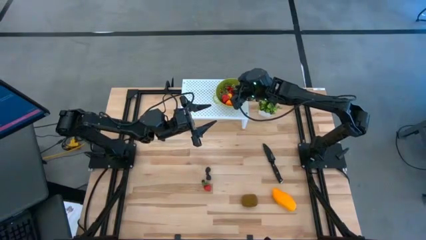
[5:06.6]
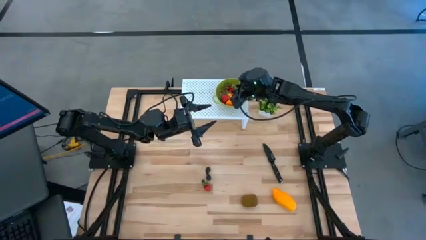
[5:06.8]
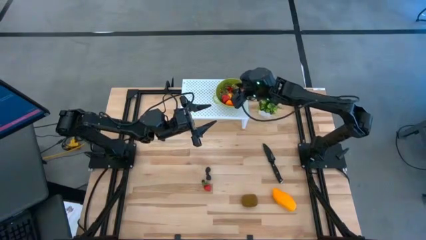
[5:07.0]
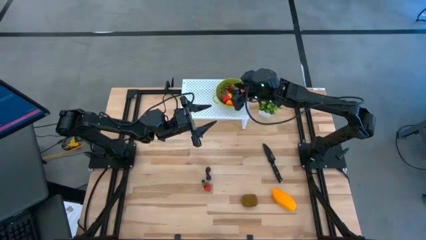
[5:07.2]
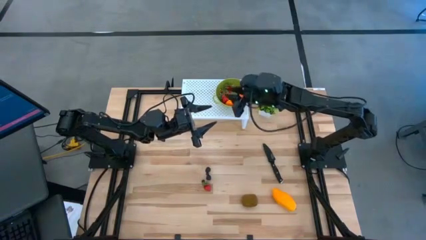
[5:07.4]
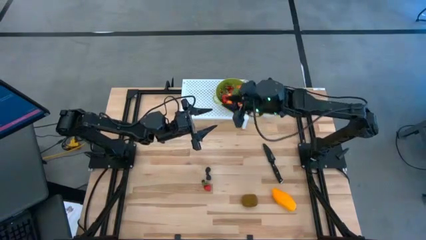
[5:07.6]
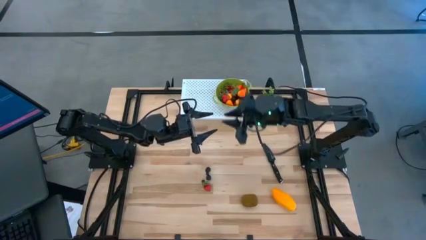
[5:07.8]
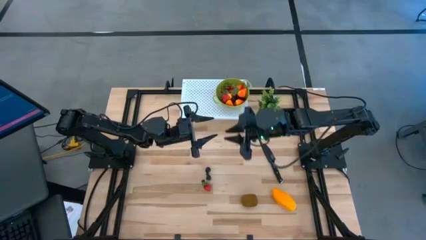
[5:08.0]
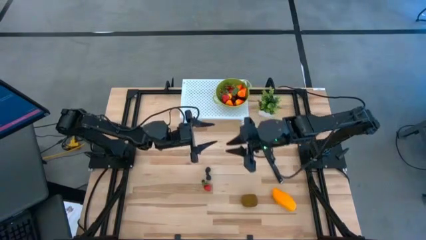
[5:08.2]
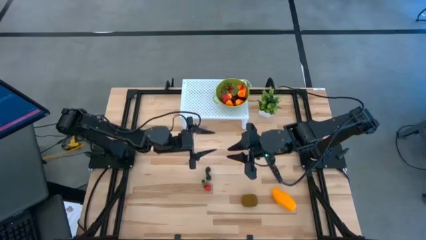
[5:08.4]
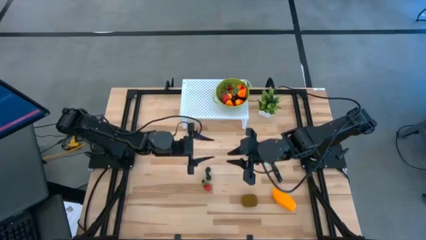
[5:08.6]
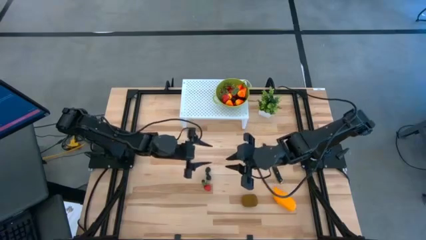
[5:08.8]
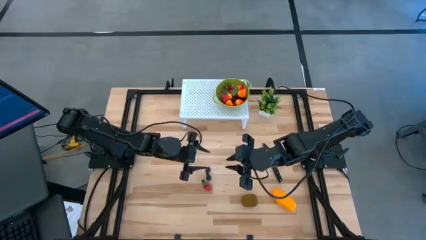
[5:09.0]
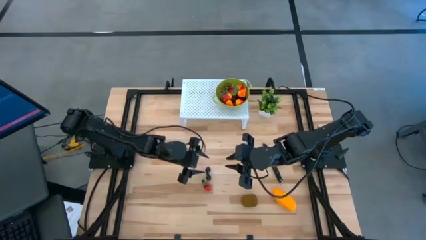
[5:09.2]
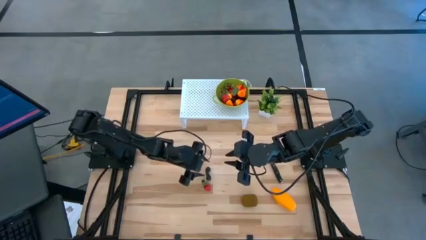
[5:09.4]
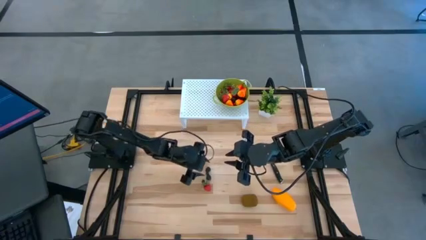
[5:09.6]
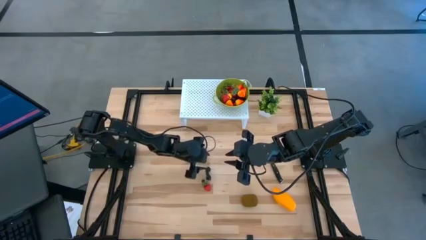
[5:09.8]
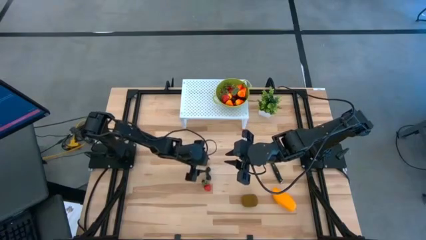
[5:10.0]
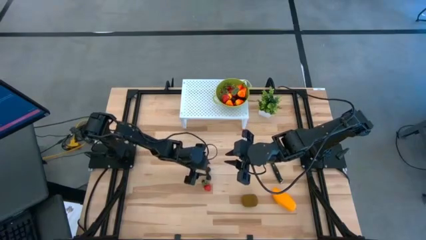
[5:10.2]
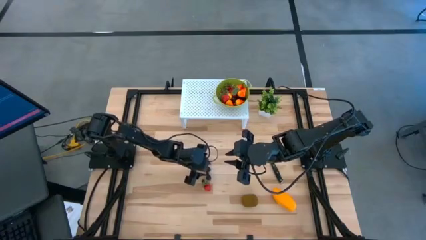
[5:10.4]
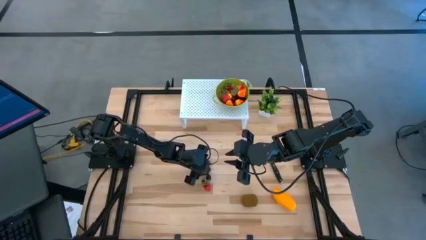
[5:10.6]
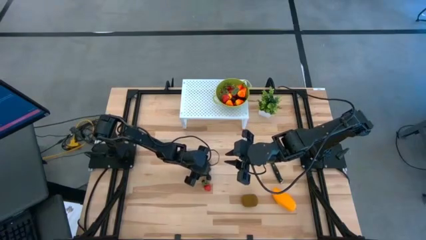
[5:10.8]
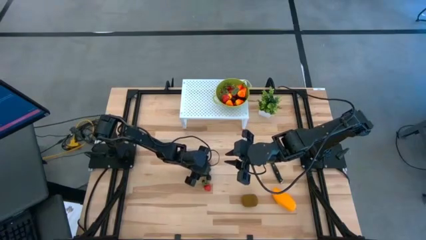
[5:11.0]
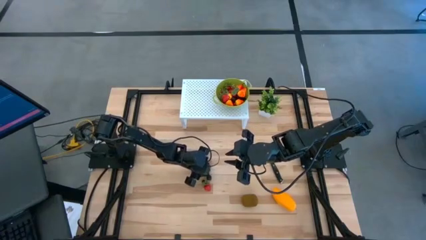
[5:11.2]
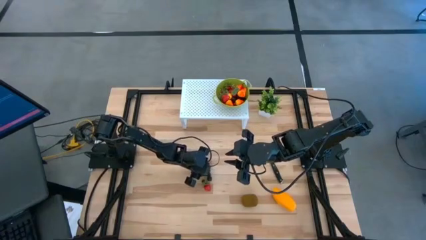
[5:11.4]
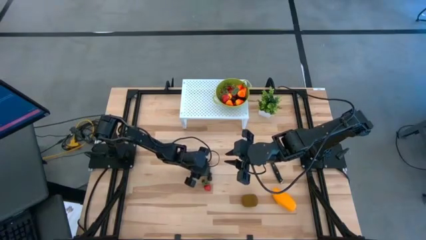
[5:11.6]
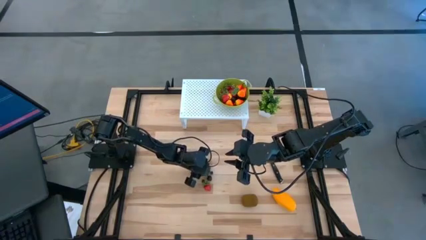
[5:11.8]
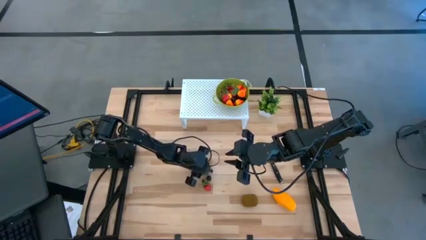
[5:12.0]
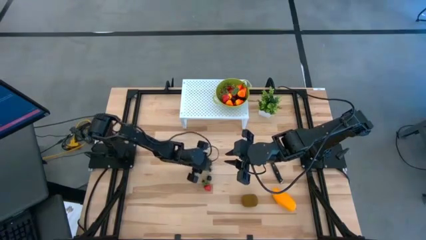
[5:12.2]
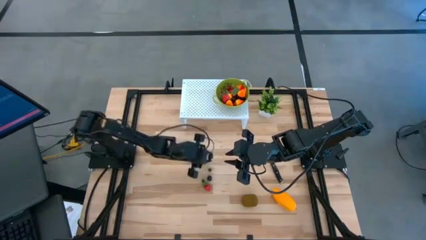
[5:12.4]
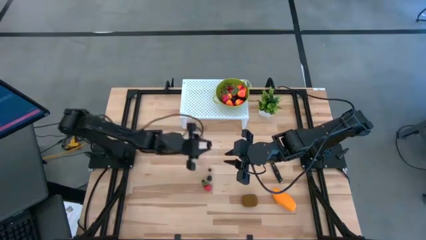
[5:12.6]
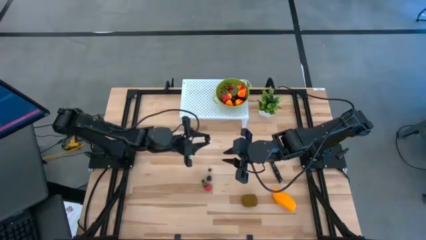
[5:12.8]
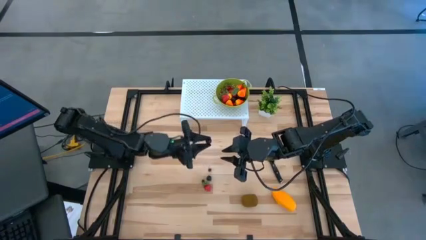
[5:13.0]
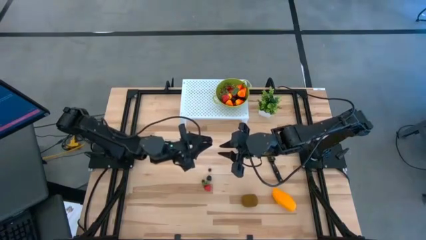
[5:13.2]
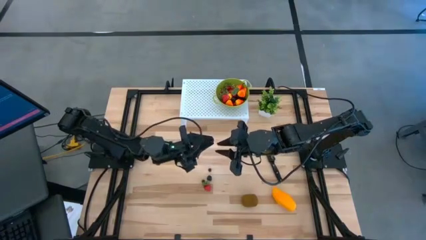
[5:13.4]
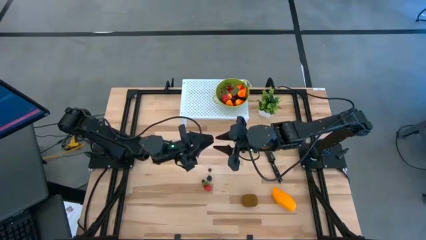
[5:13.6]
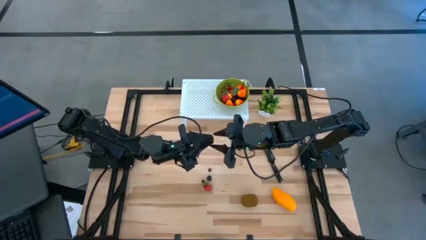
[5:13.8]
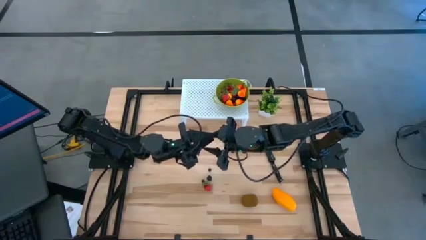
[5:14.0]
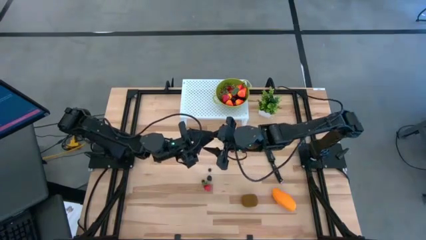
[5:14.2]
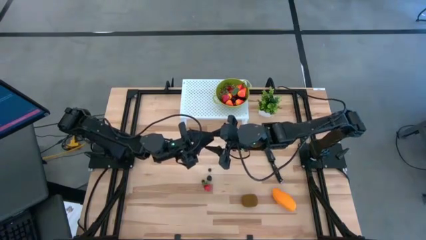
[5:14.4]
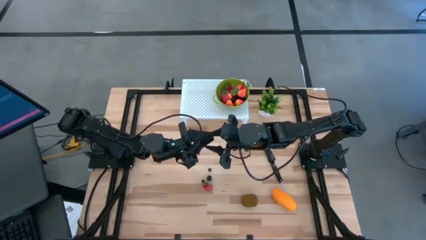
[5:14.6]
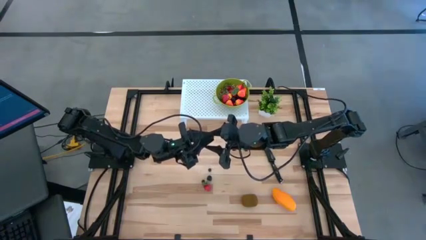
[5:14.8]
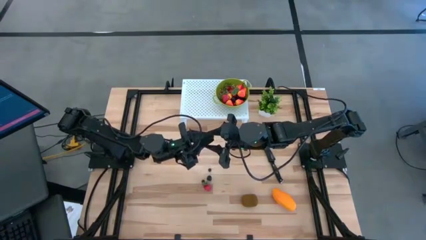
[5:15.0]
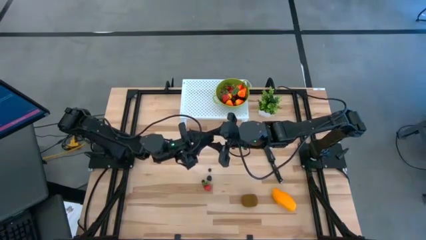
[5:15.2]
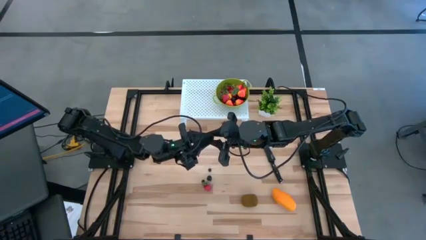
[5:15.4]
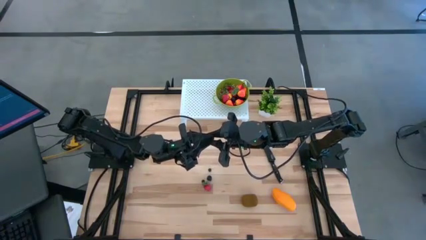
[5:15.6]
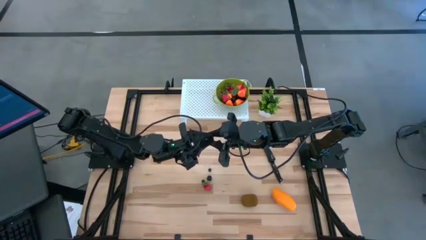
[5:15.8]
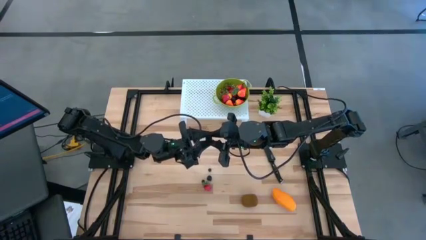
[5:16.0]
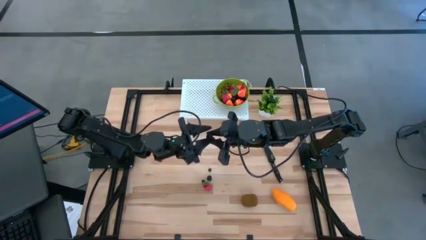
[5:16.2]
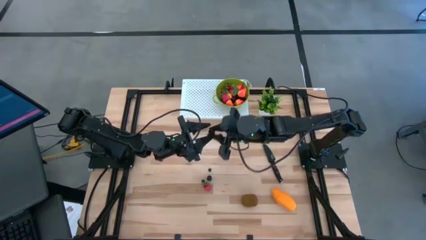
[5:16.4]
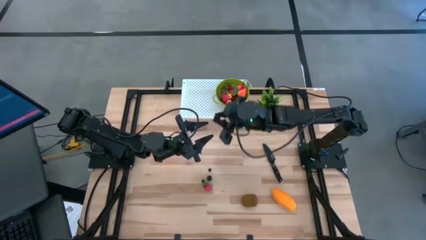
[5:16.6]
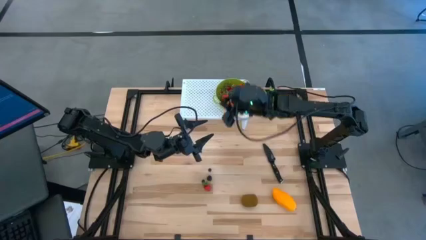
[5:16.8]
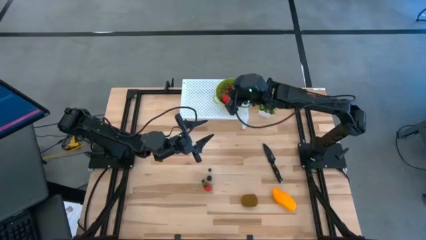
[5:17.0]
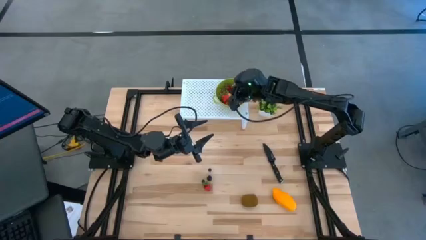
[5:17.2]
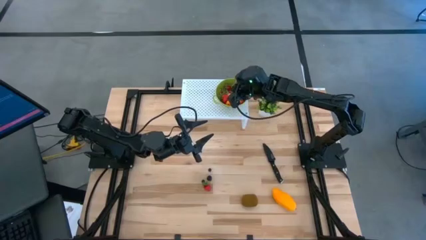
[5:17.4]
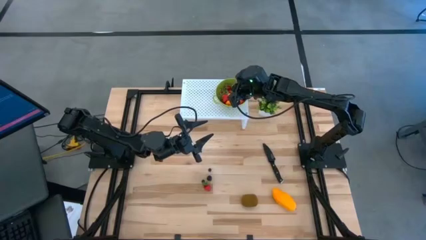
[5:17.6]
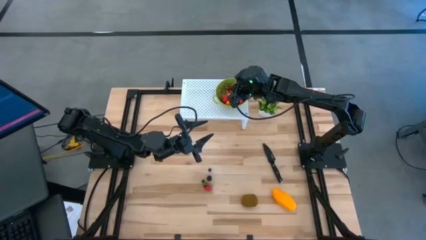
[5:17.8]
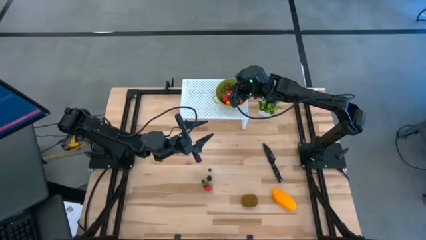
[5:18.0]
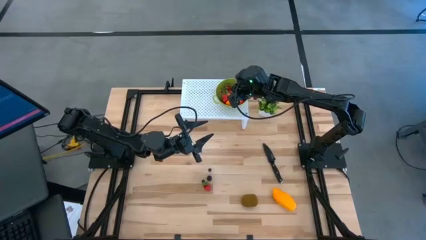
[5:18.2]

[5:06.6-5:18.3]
Task: Pick & Place Fruit
Put the black raspberry into the green strainer bowl
